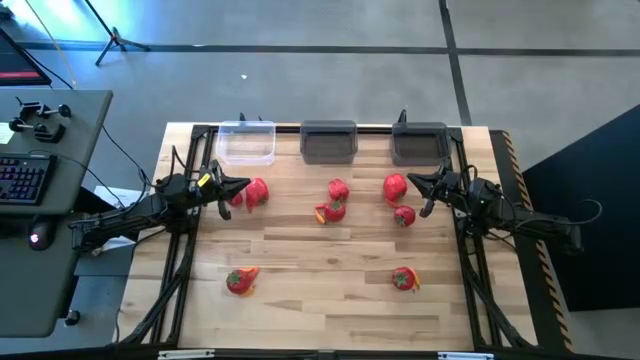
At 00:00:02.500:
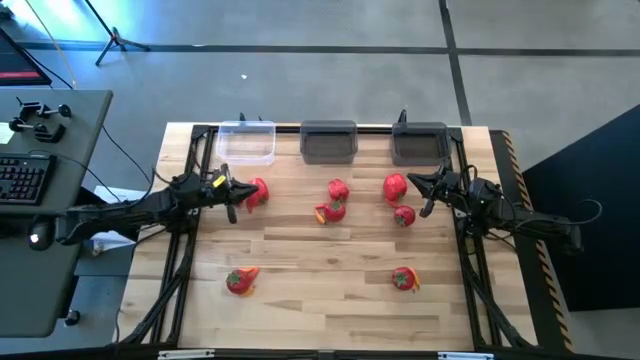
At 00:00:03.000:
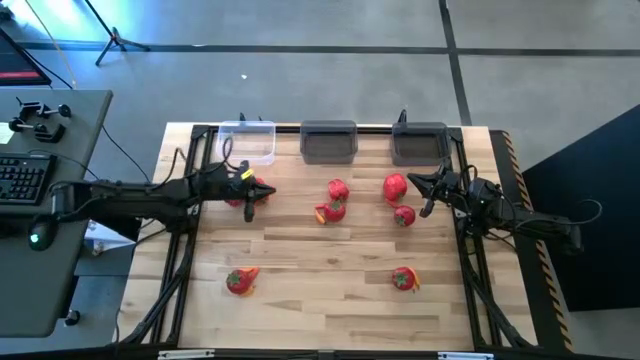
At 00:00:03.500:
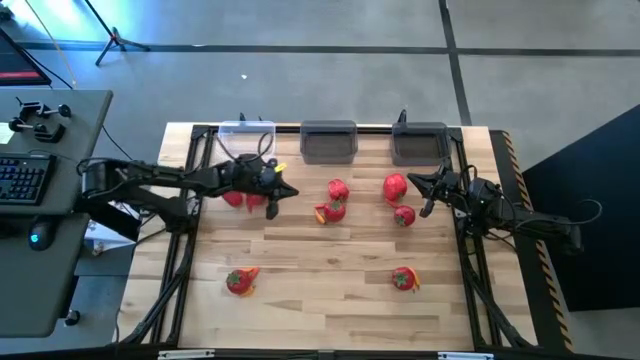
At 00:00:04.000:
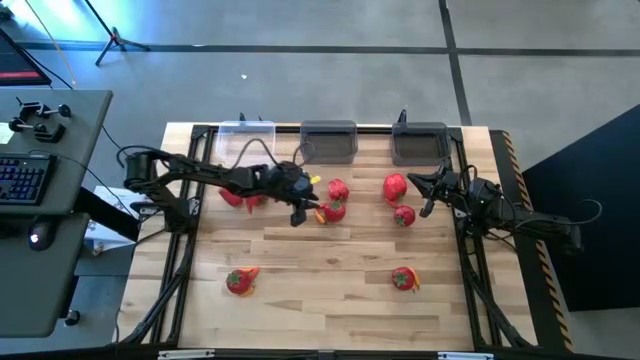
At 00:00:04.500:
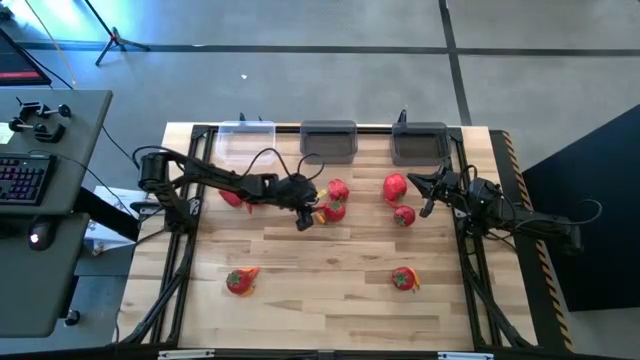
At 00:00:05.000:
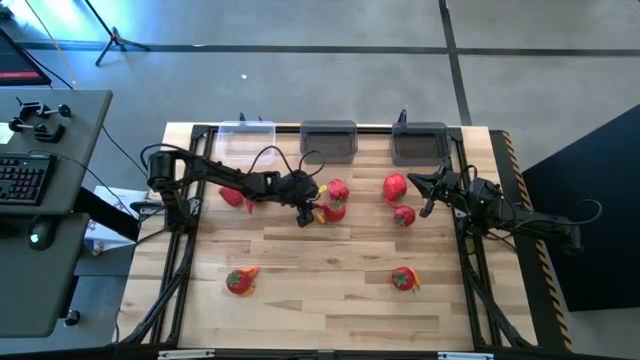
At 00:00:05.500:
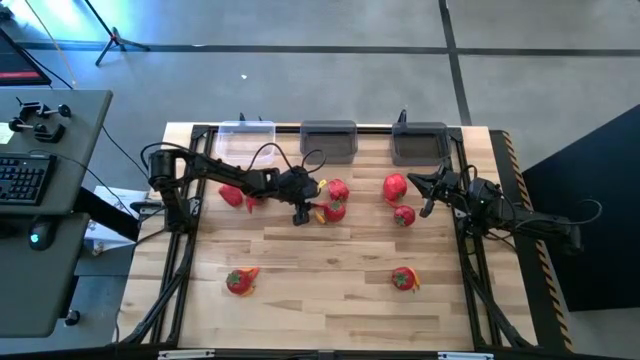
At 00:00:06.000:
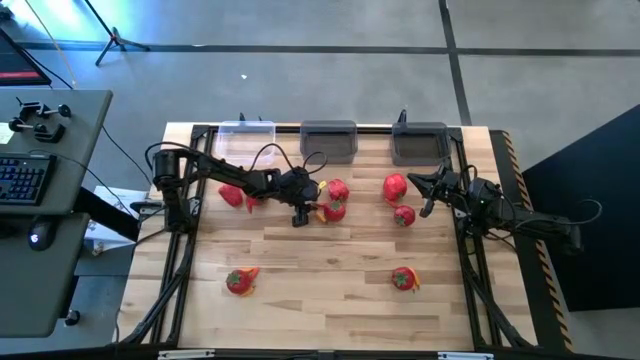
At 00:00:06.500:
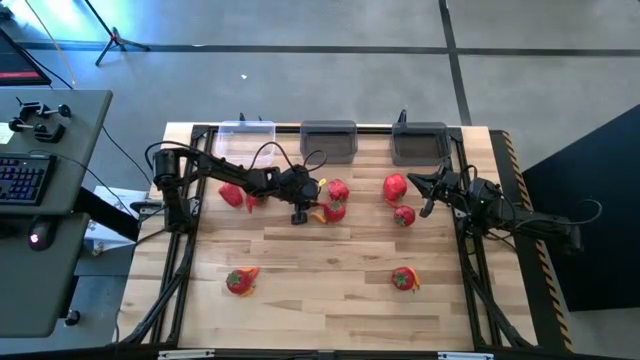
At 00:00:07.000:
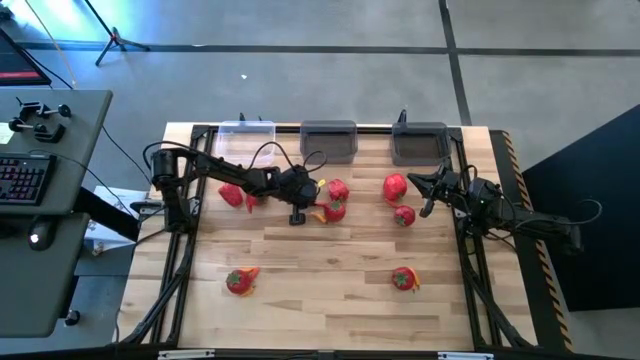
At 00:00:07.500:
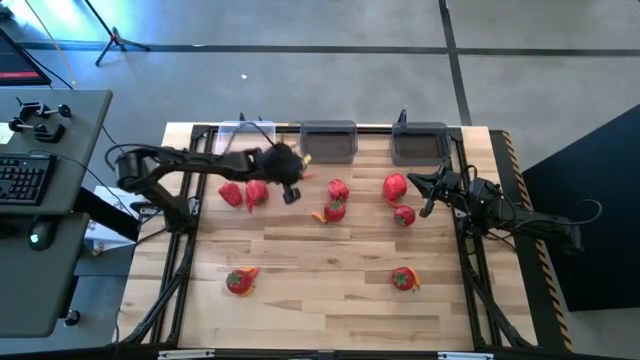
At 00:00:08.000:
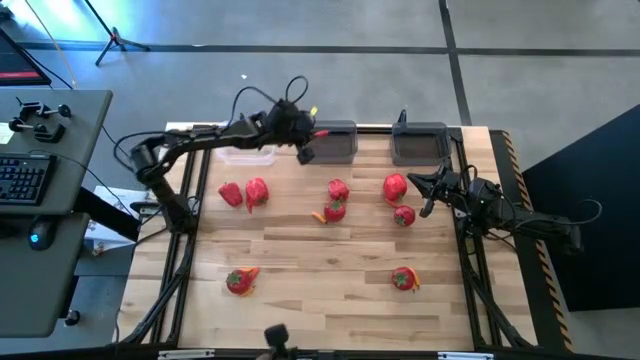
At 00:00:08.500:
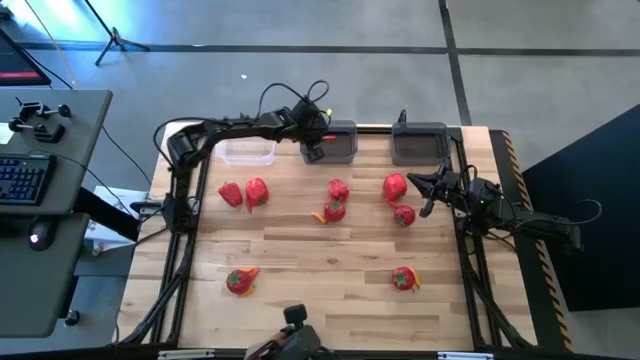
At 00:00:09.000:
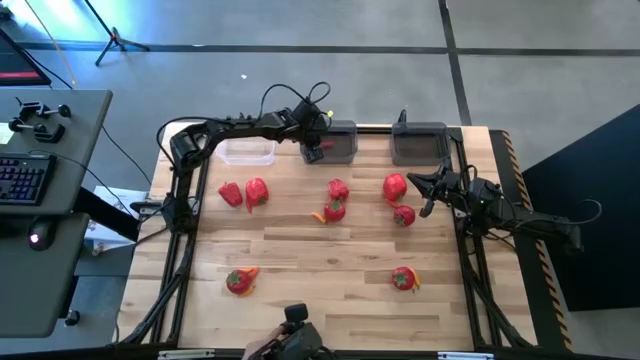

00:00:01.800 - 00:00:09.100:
Task: Sort produce into baskets
Put the orange chili pepper into the left black bin

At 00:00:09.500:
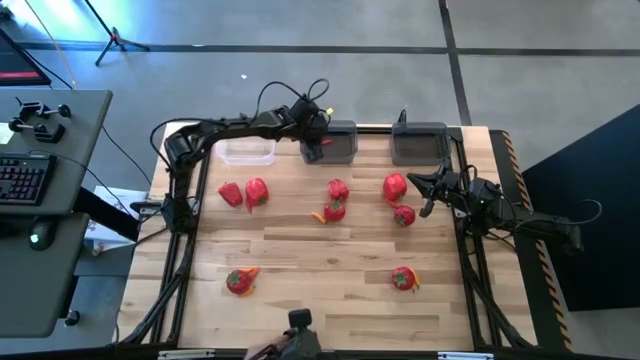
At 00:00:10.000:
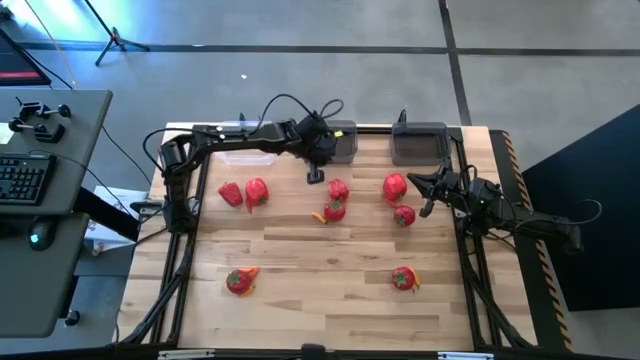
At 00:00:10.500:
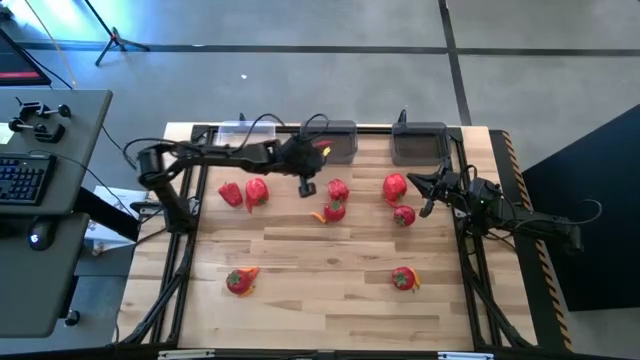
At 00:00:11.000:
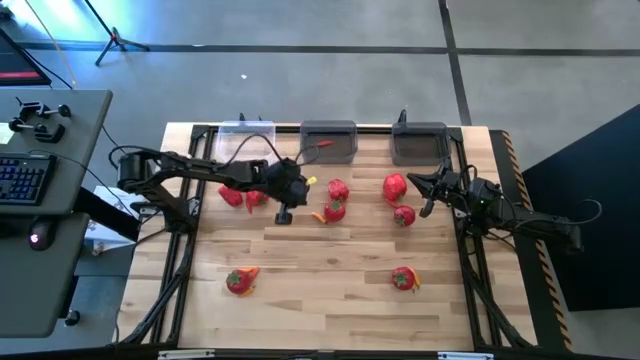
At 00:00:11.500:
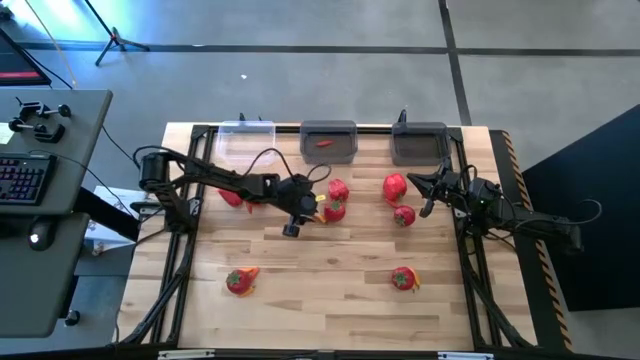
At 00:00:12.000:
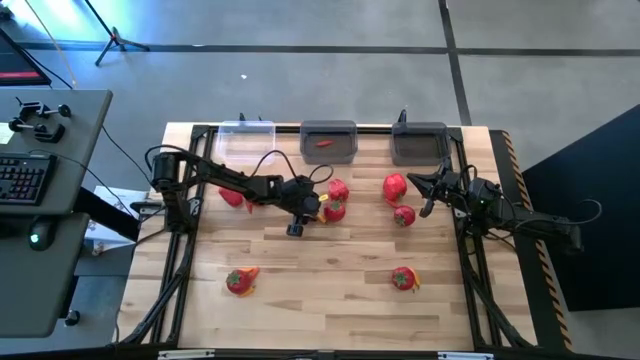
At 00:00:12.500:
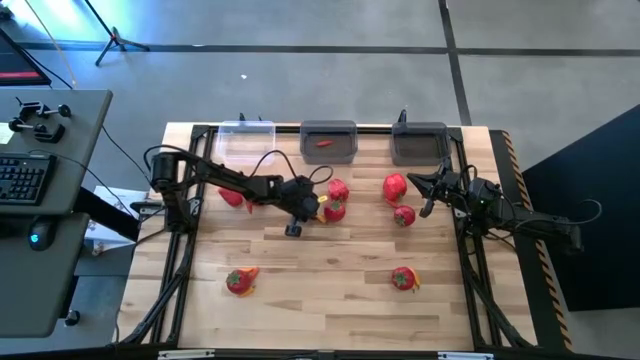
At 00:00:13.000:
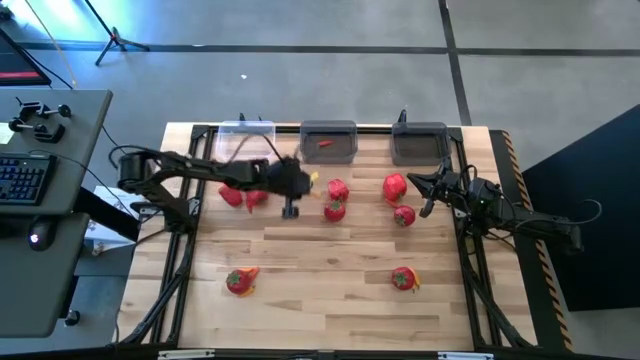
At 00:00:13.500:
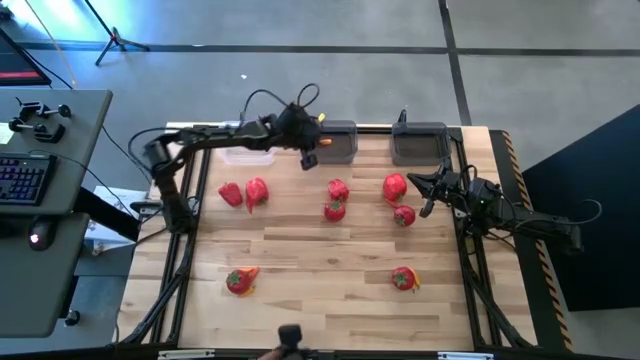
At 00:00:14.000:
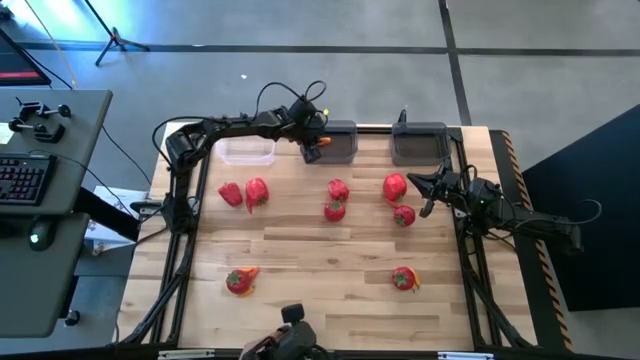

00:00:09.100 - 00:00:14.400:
Put the yellow chili pepper into the left black bin

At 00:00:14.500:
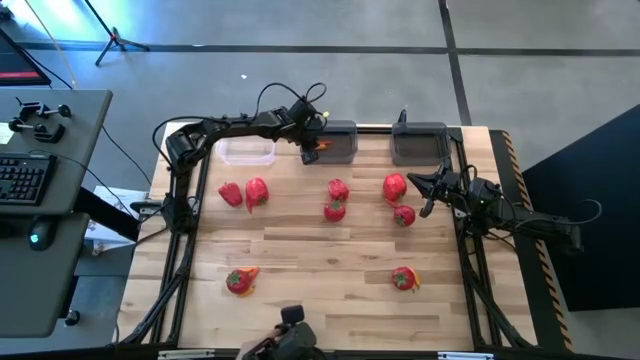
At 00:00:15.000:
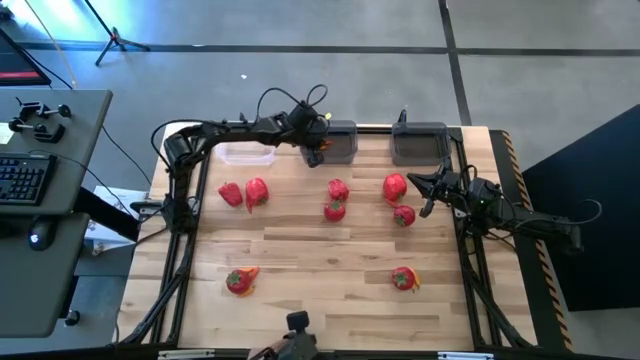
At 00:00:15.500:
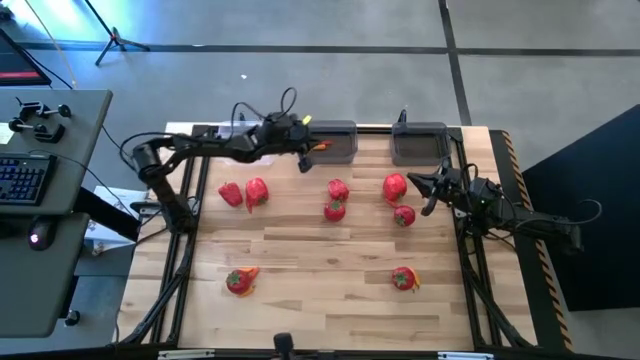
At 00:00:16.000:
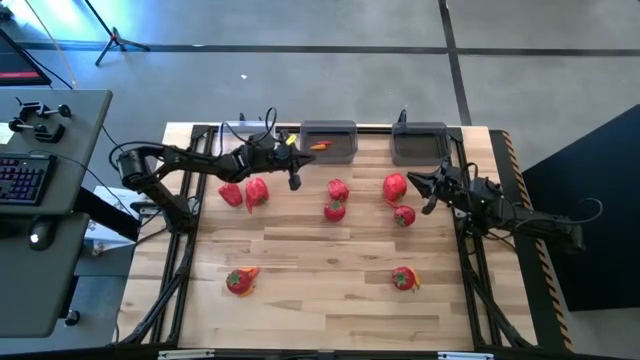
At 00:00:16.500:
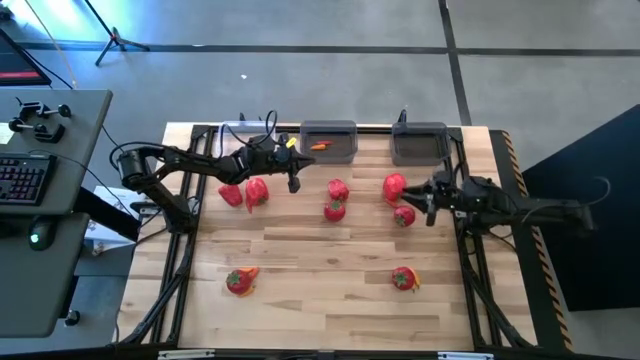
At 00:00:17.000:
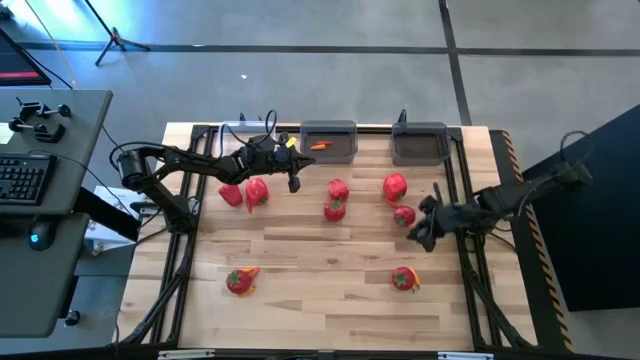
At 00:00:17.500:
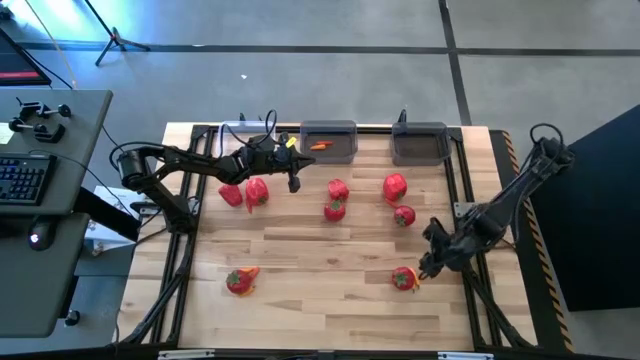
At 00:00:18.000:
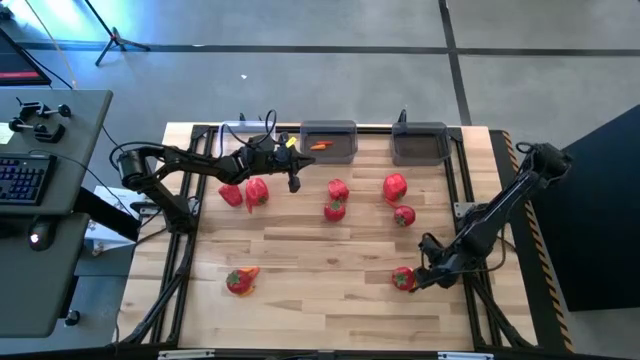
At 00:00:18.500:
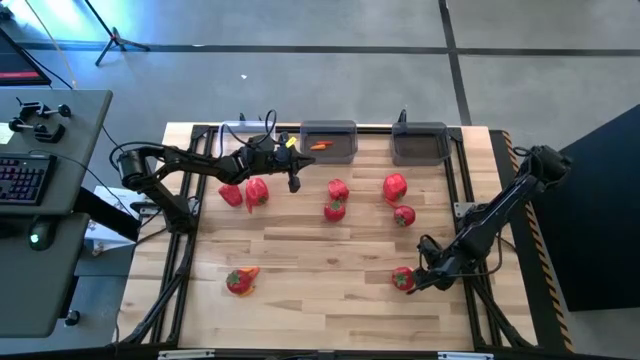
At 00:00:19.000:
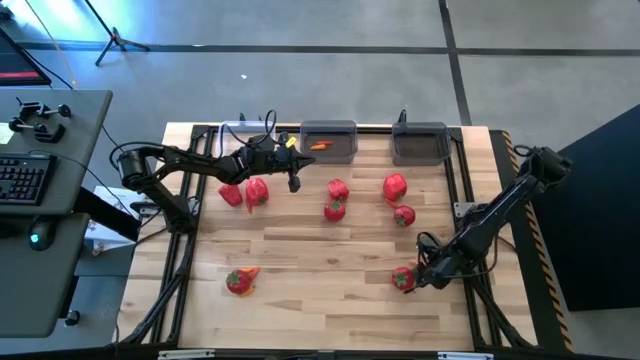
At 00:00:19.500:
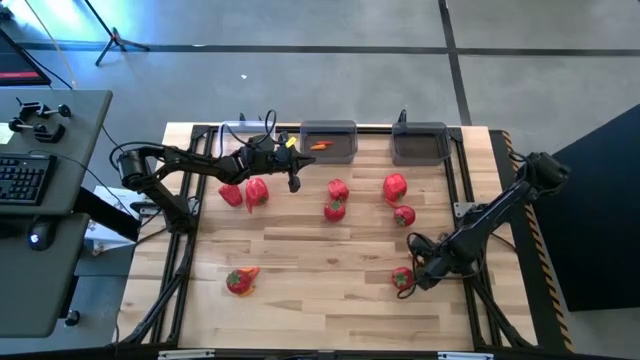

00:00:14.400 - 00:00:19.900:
Put the yellow chili pepper into the left black bin

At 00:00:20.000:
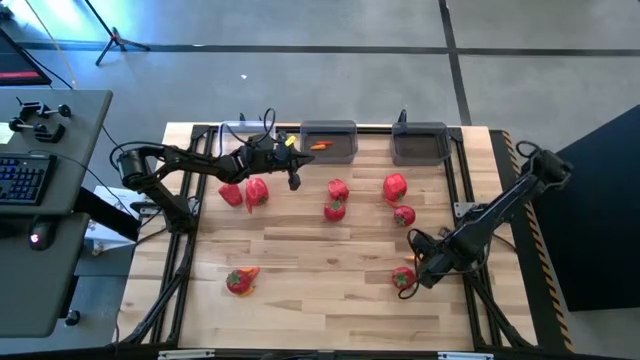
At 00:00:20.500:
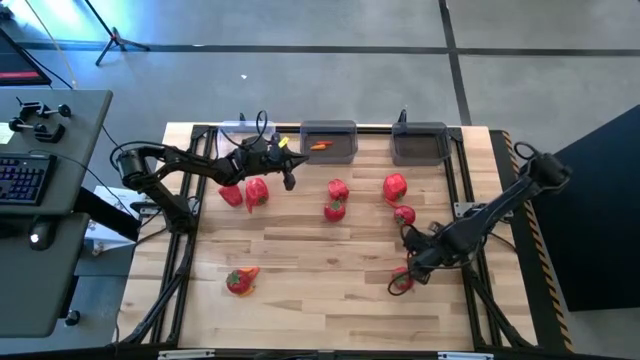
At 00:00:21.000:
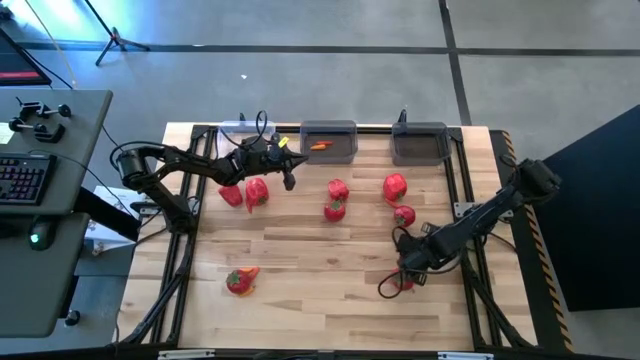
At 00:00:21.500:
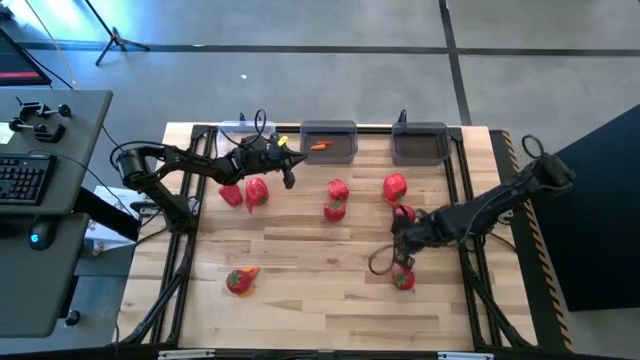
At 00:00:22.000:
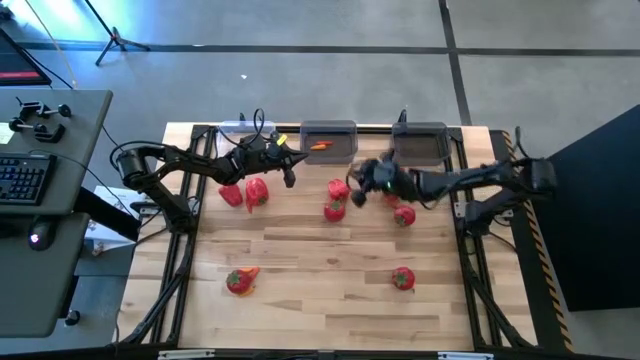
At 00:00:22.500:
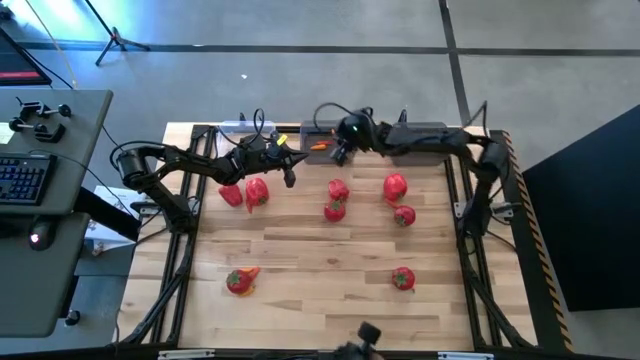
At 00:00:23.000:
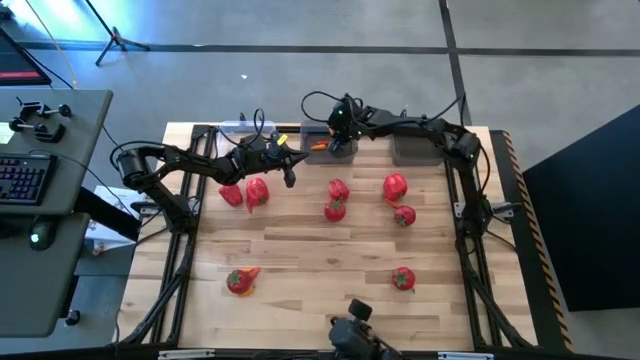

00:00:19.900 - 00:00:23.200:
Put the yellow chili pepper into the left black bin

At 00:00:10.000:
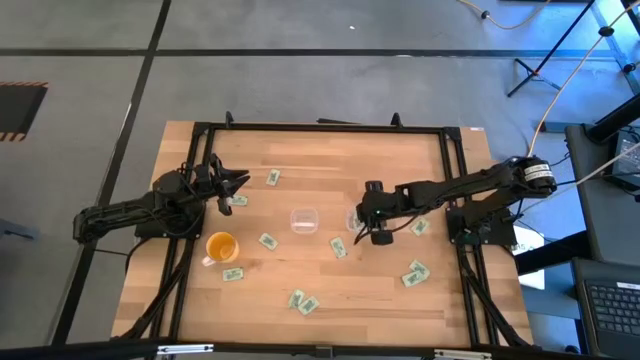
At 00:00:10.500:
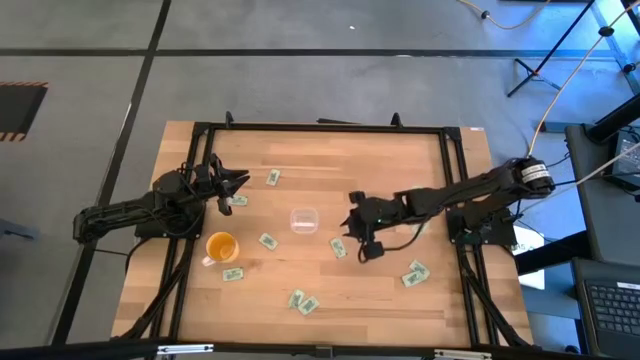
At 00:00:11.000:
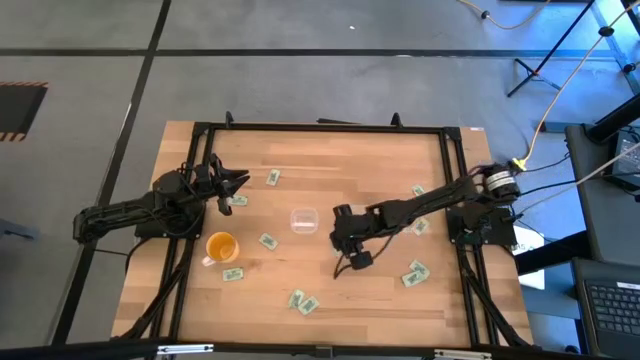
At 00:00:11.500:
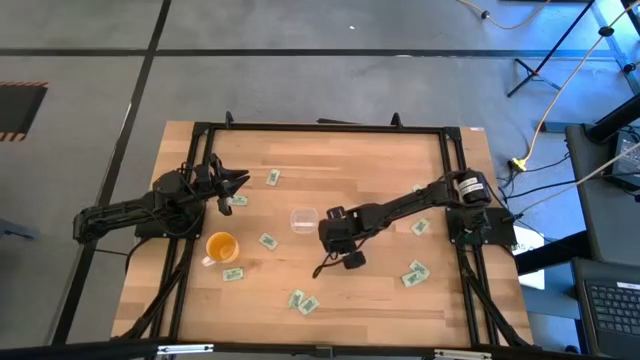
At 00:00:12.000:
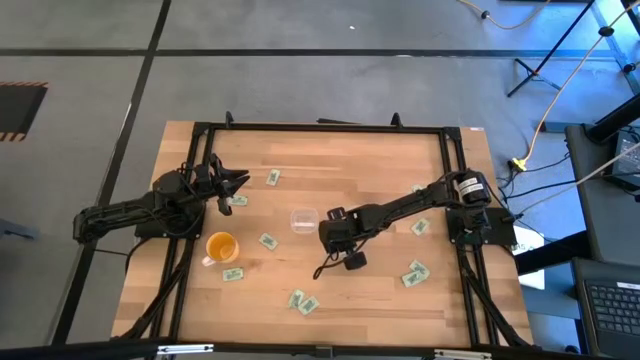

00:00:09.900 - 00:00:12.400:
Task: Pick and place Stevia / Truvia into bins
Put the stevia packet into the right transparent container
